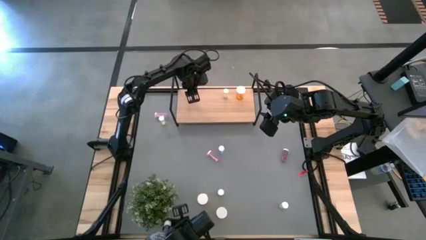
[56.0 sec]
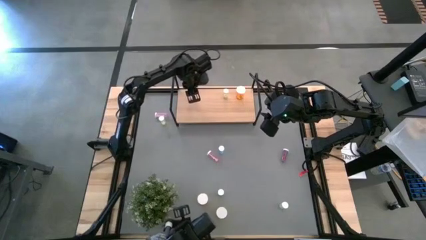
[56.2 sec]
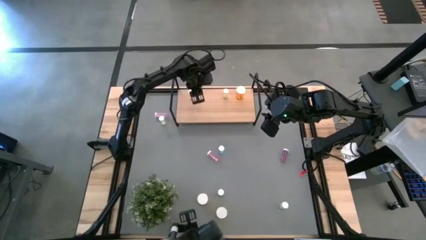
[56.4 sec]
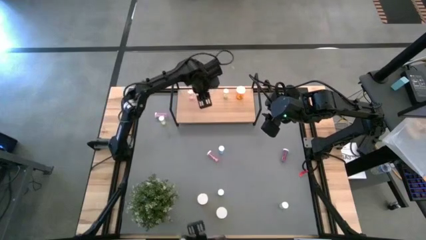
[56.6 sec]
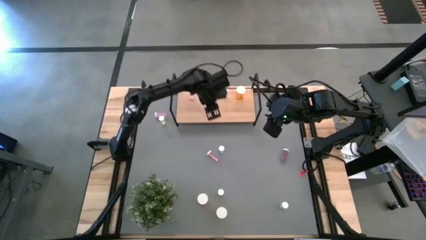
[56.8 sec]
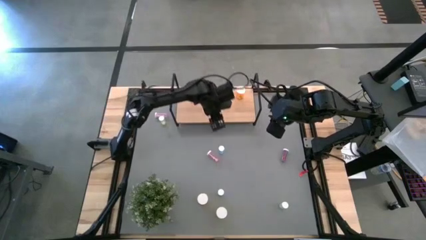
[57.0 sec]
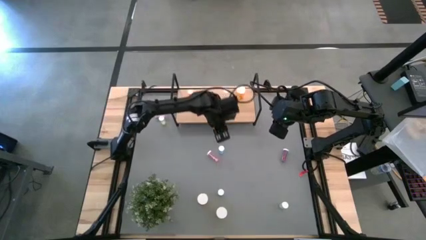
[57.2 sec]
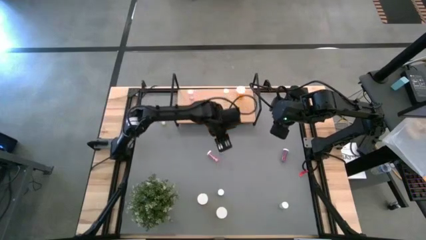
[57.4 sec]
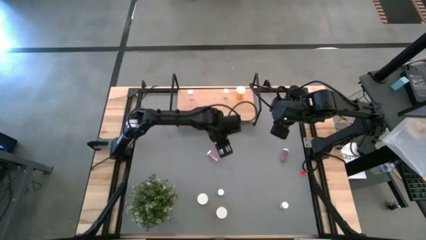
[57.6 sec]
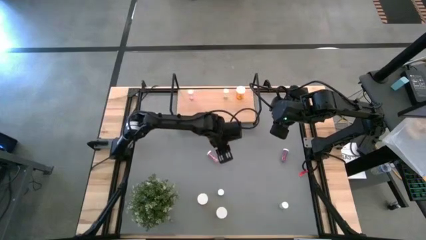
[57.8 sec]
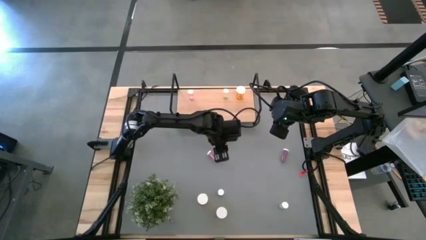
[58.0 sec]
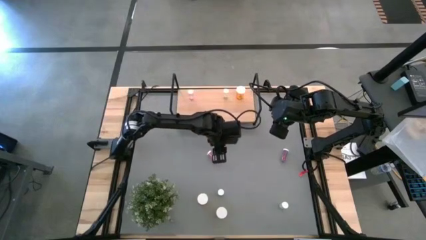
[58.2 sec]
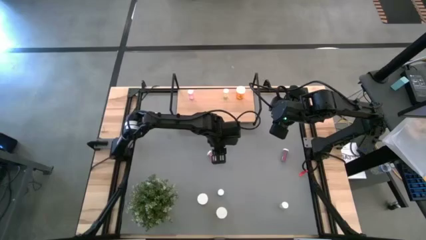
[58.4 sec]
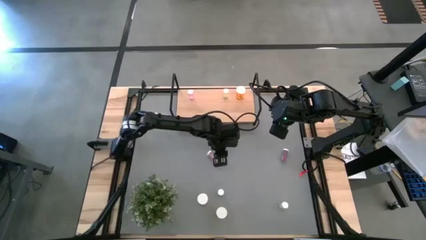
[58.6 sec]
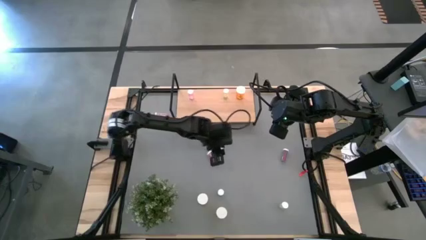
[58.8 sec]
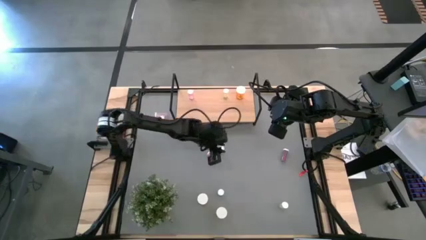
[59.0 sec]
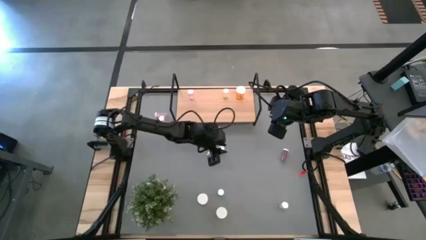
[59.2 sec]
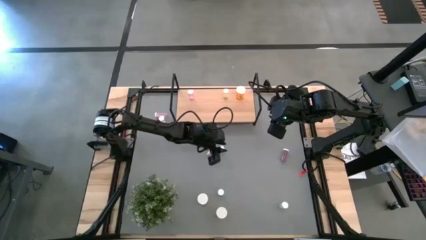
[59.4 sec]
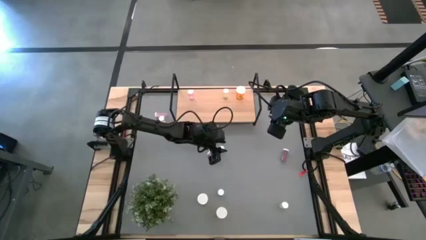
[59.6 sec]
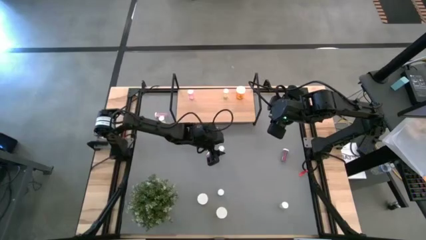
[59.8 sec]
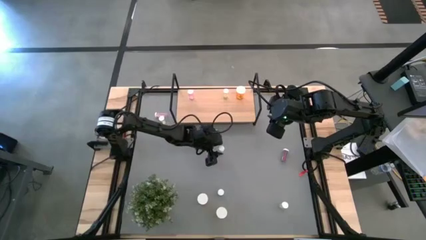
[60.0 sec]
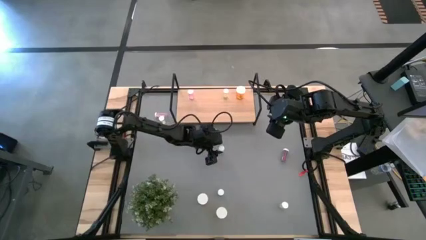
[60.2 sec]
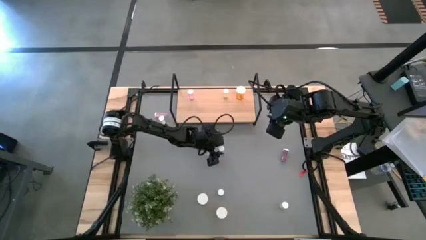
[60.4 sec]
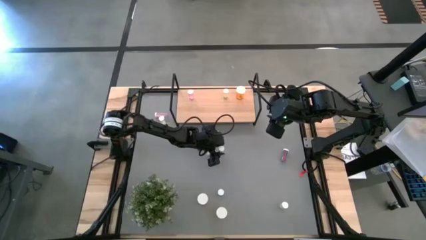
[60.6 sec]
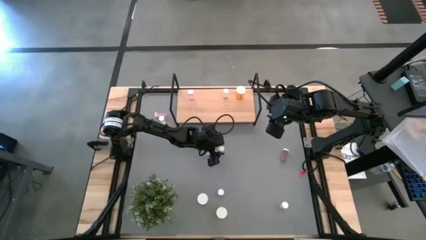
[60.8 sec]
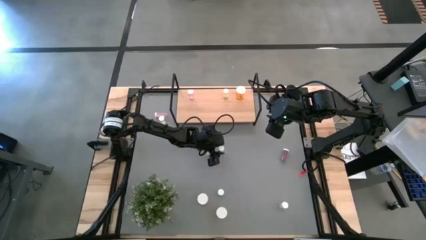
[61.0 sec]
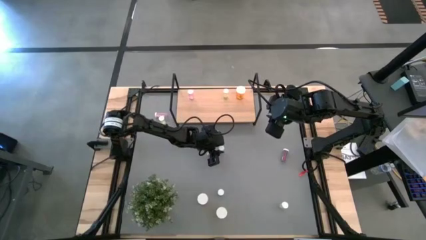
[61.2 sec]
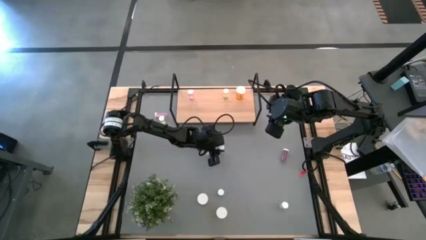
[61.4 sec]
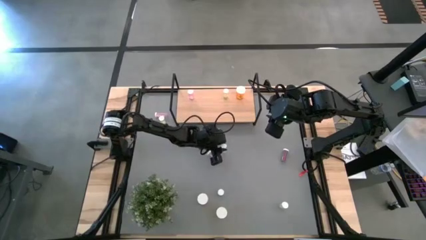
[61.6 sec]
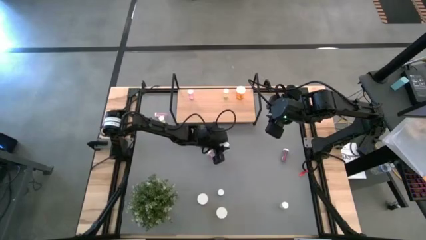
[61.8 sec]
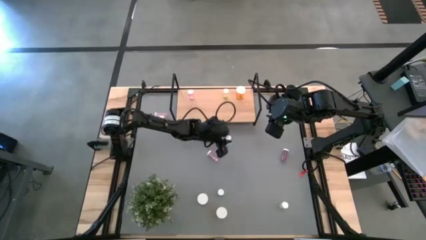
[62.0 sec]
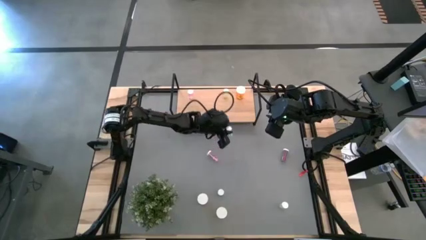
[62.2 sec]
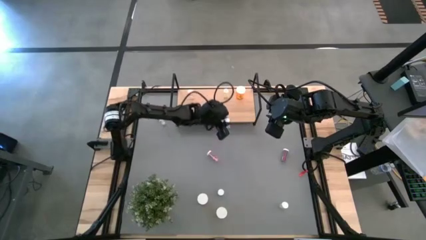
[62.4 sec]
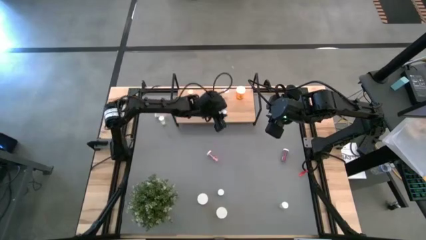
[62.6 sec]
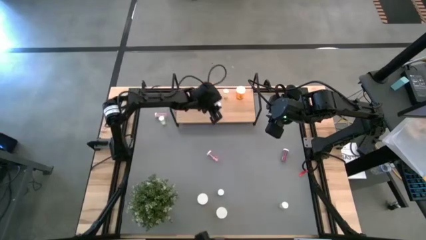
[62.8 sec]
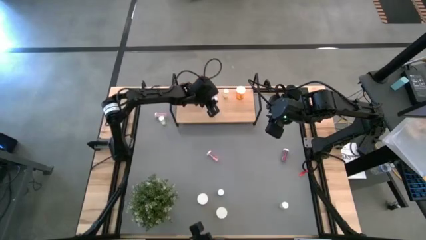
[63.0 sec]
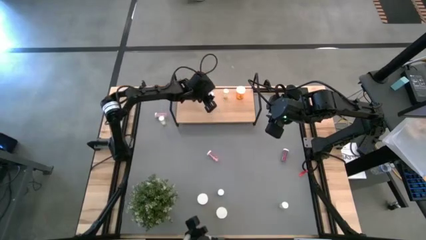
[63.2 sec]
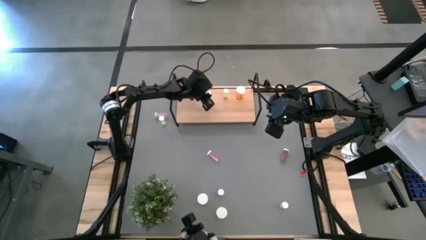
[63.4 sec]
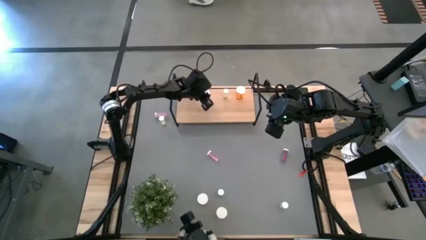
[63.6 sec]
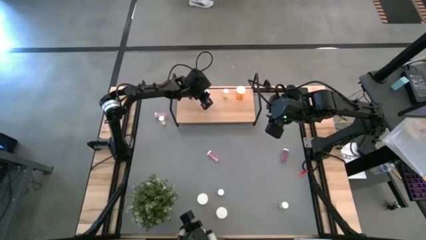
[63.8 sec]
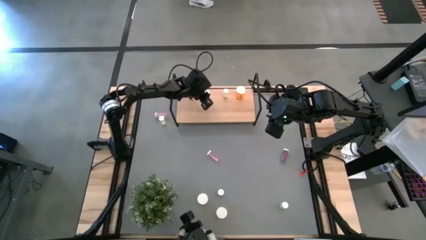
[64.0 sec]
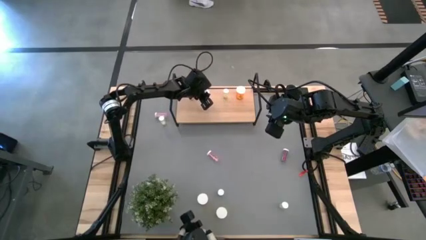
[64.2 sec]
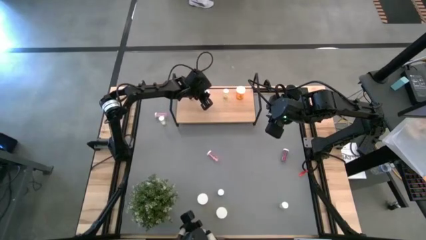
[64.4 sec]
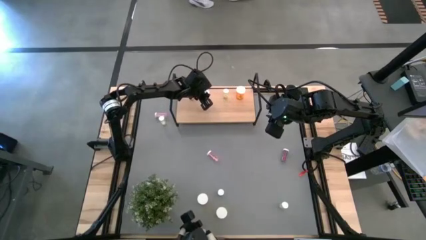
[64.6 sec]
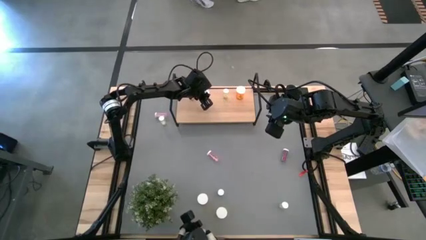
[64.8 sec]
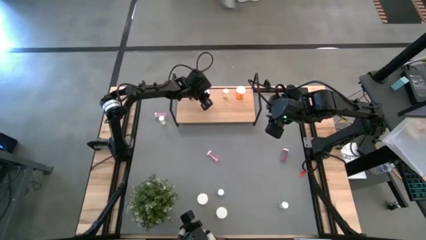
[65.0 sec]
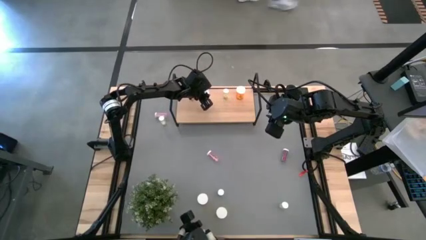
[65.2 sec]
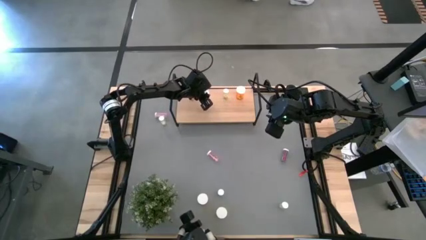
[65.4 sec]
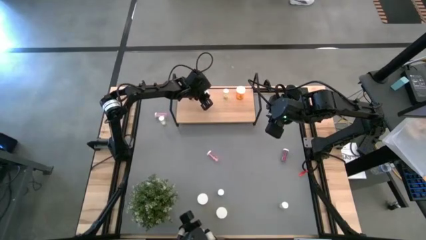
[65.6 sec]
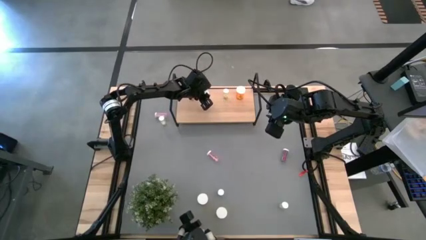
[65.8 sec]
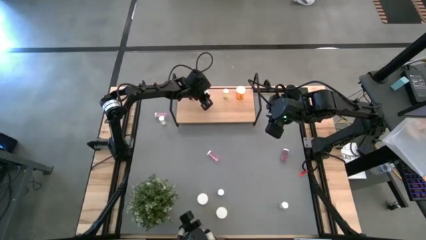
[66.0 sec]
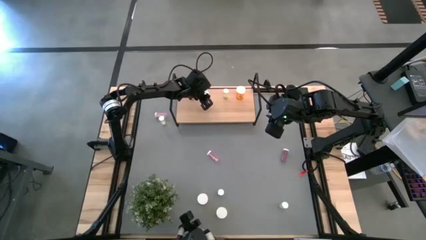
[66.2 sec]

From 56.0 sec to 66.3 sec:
Task: Pick and place medicine bottles onto shelf by color
Put the top right blue pill bottle on the shelf

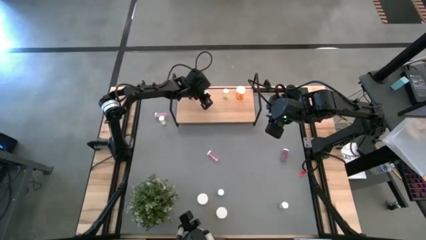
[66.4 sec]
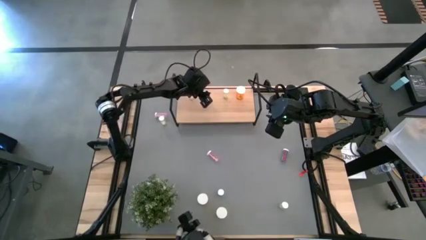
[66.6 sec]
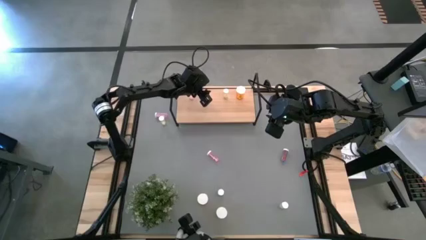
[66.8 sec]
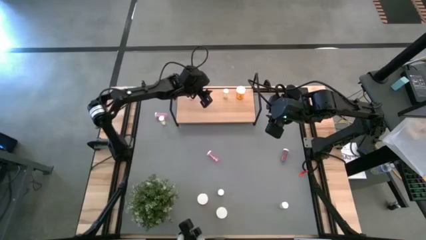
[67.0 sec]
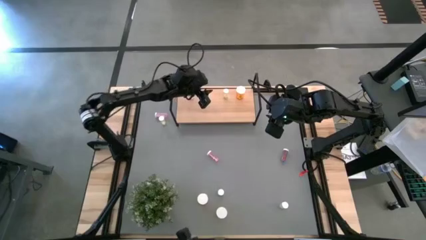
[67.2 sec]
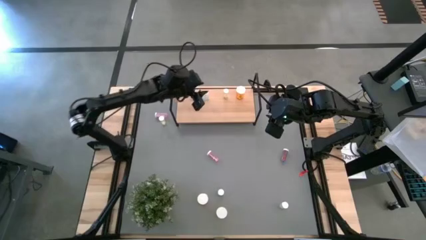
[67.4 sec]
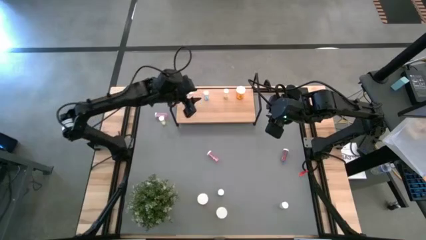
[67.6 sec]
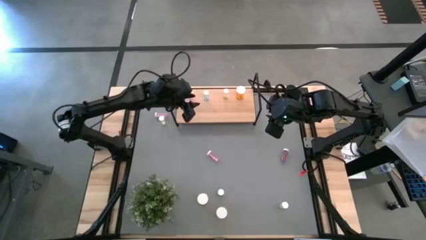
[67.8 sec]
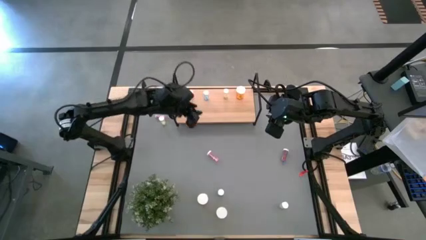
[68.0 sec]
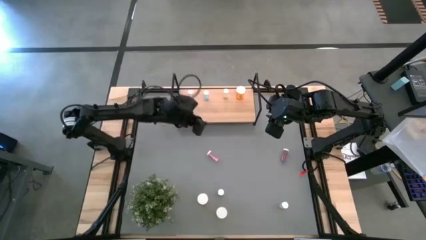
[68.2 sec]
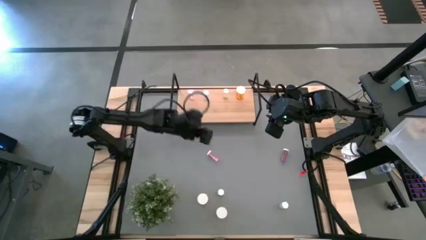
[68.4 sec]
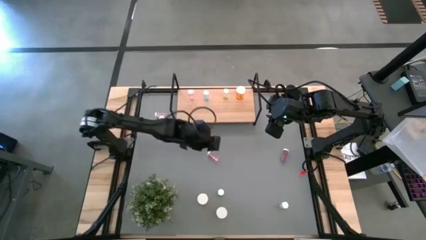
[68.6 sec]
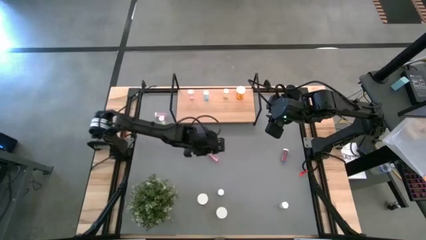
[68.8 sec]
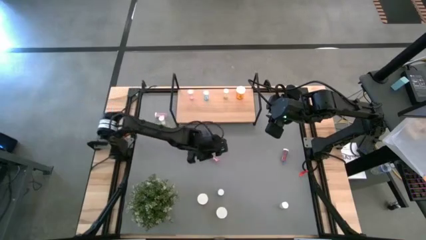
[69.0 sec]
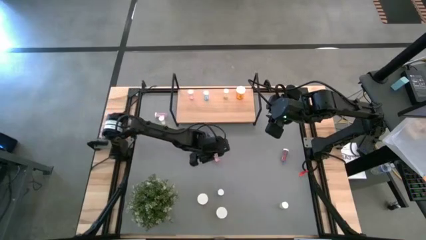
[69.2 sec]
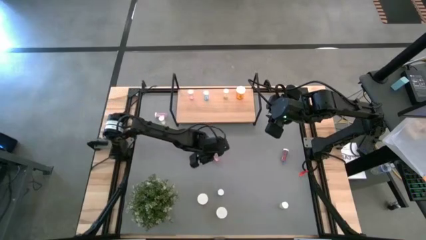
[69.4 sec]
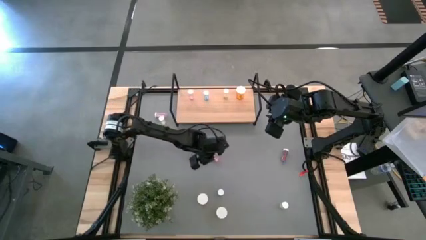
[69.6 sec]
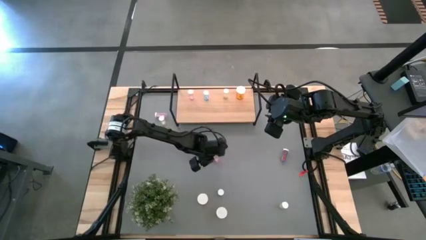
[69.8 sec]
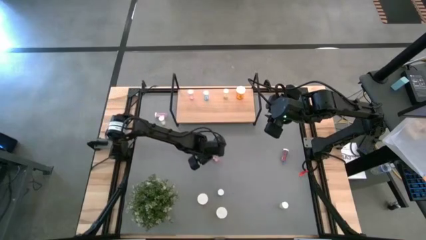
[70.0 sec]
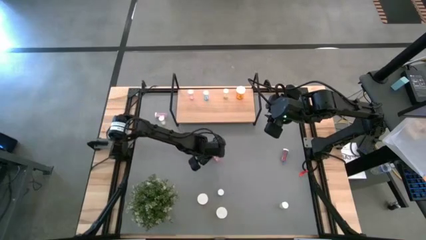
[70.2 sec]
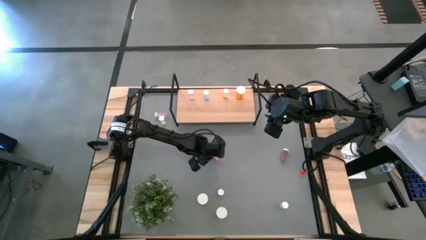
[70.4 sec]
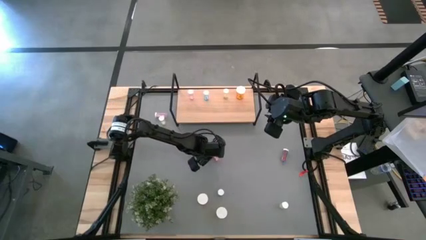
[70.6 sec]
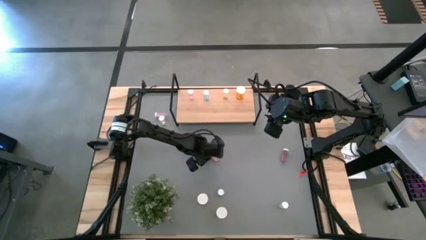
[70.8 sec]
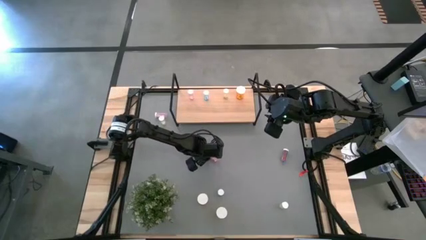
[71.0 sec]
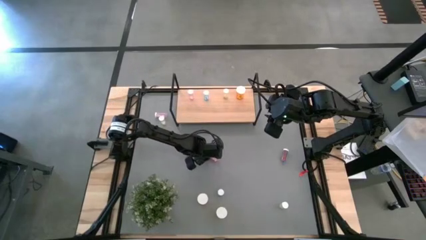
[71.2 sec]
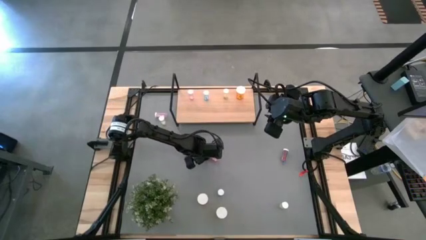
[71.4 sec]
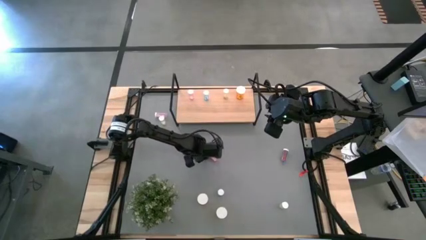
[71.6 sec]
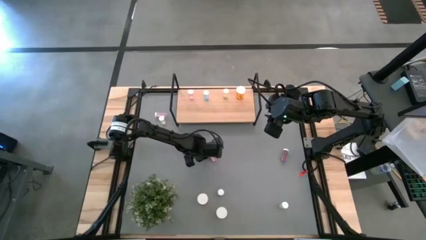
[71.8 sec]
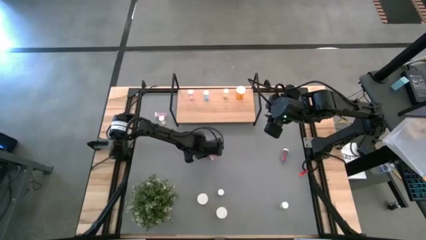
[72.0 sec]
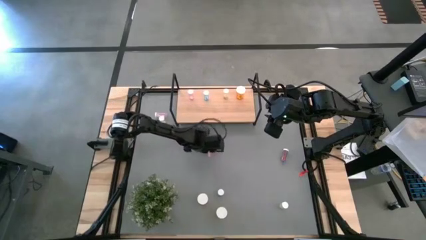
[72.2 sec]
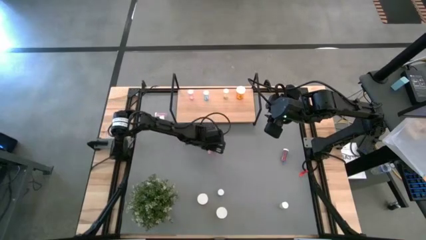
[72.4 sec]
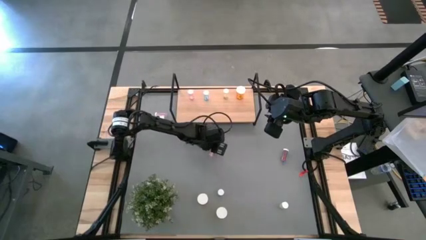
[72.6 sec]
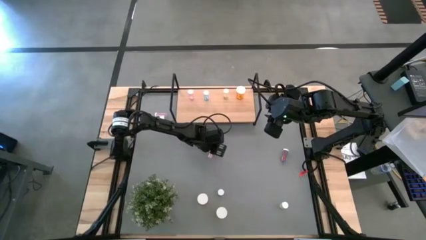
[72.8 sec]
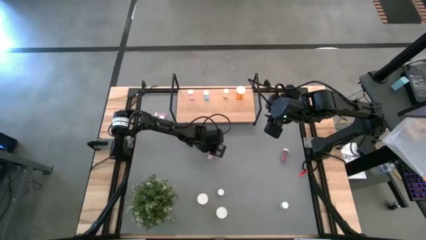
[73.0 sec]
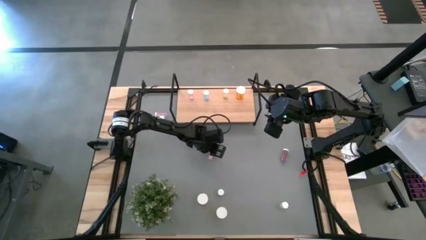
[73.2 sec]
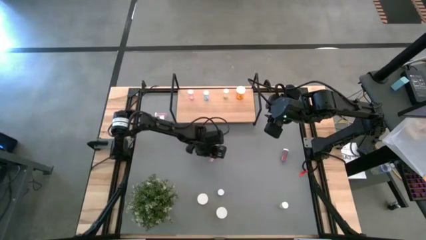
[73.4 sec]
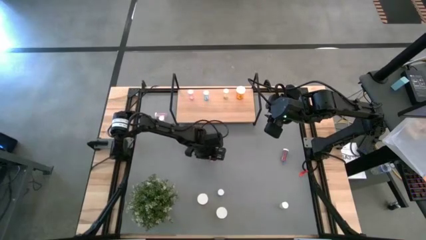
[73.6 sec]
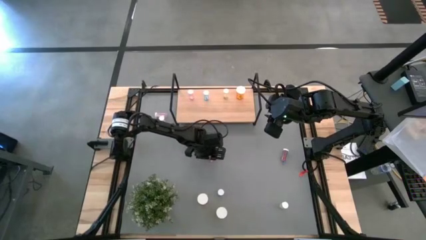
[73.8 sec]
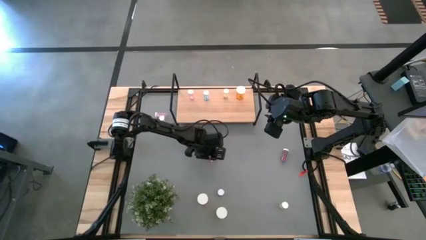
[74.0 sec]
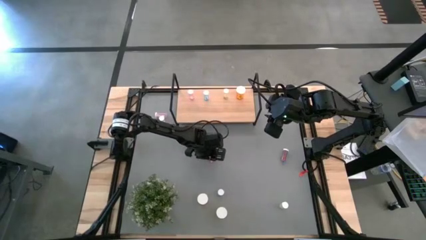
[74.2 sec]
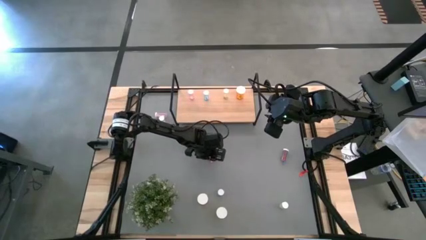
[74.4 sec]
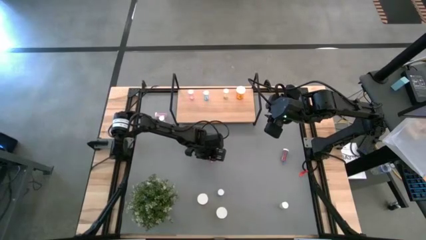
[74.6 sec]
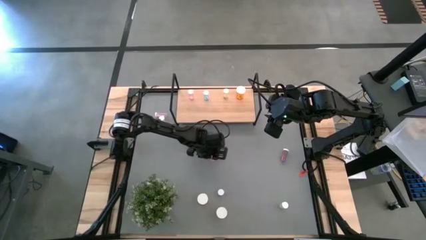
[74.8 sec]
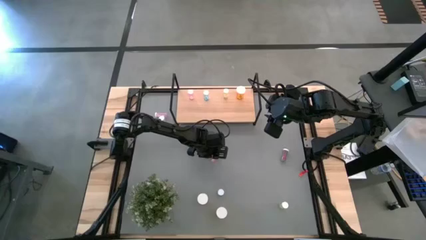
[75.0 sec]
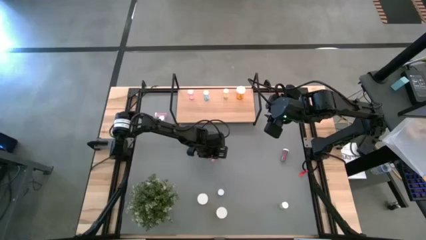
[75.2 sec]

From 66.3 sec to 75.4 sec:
Put the right pink pill bottle on the shelf aligned with the other pink pill bottle
